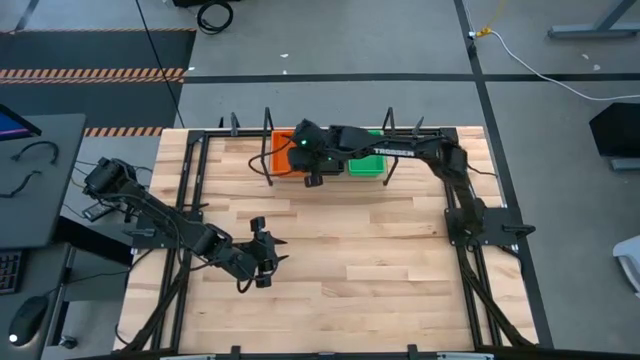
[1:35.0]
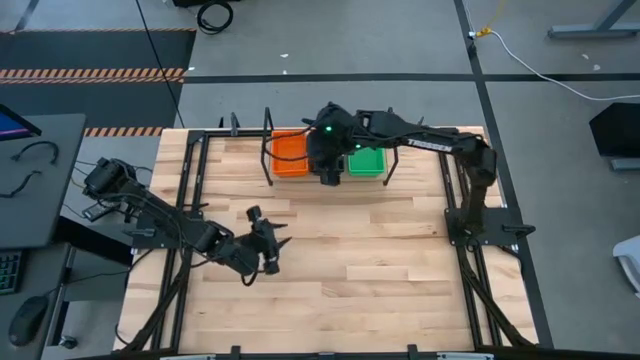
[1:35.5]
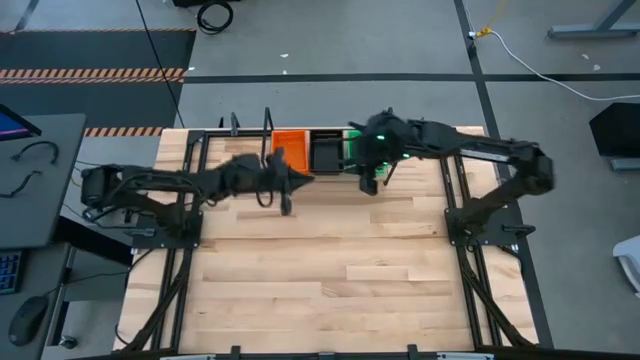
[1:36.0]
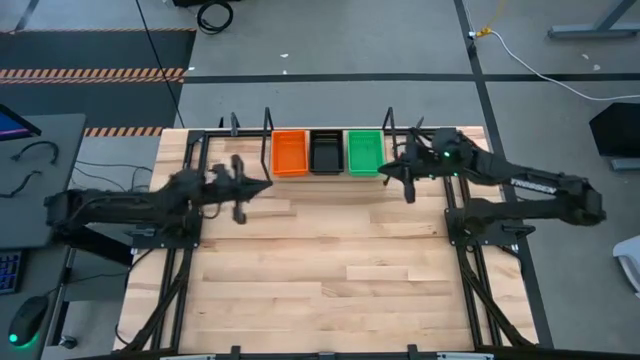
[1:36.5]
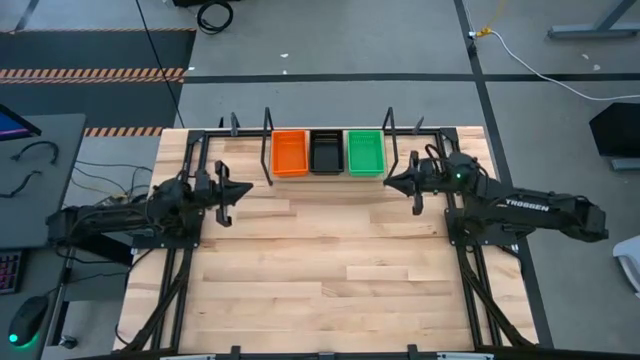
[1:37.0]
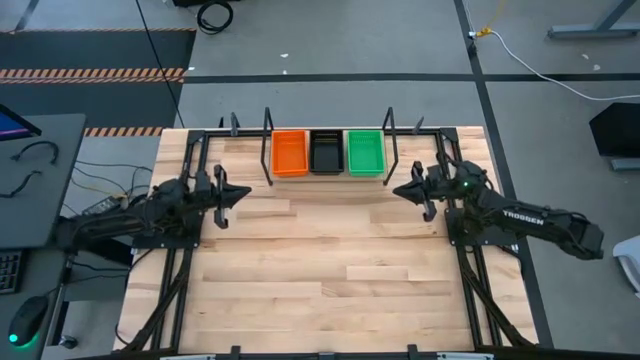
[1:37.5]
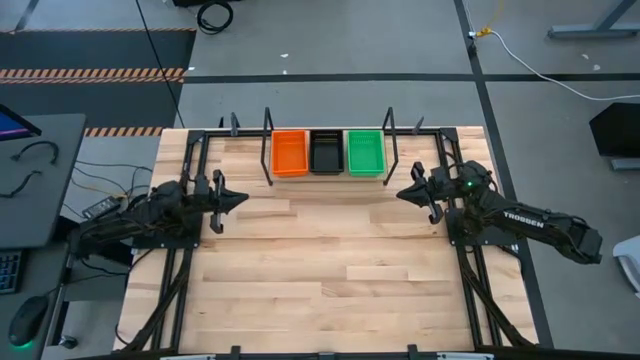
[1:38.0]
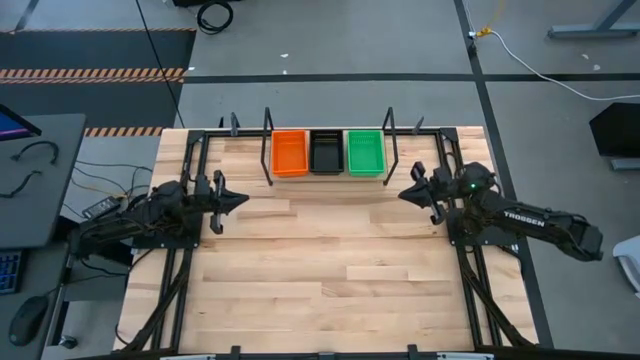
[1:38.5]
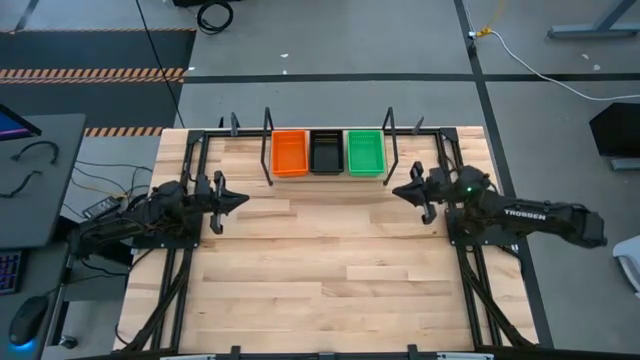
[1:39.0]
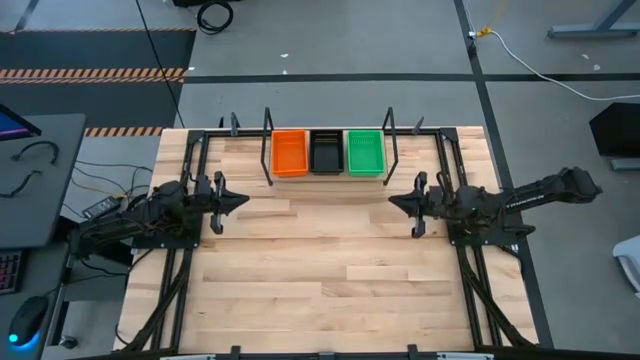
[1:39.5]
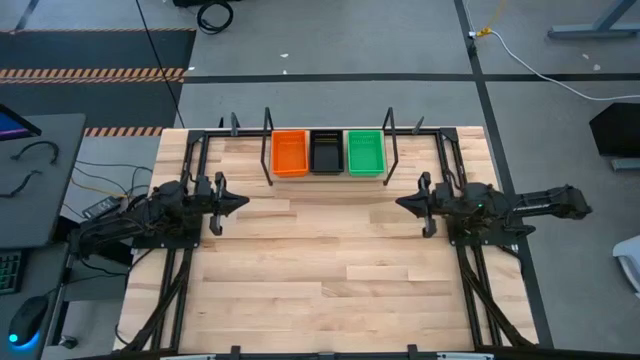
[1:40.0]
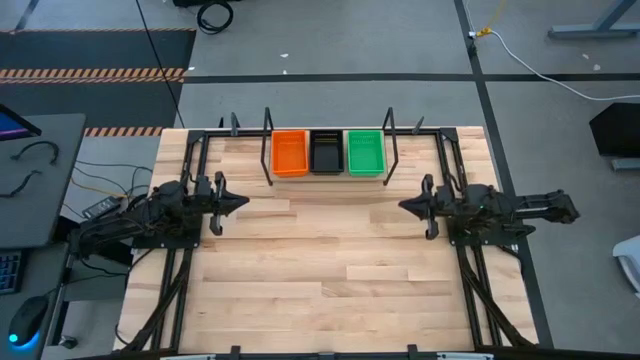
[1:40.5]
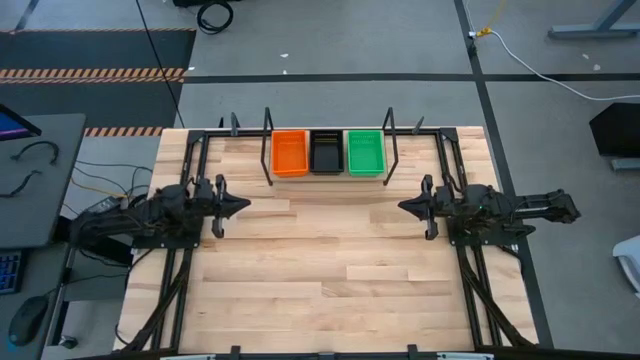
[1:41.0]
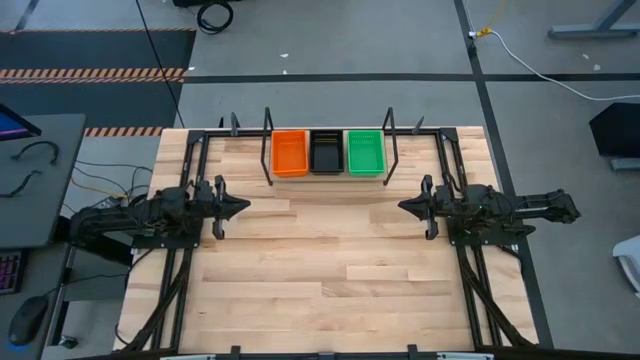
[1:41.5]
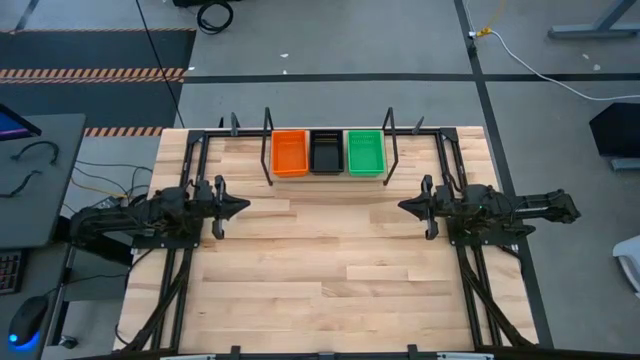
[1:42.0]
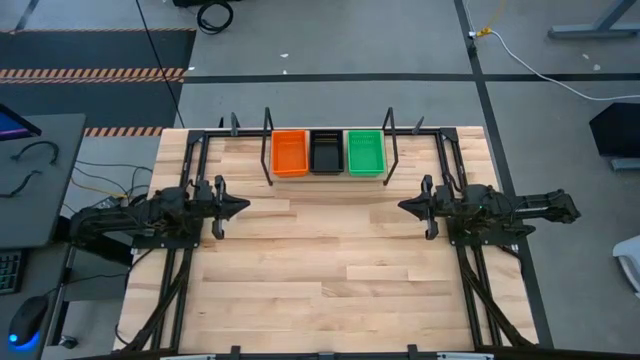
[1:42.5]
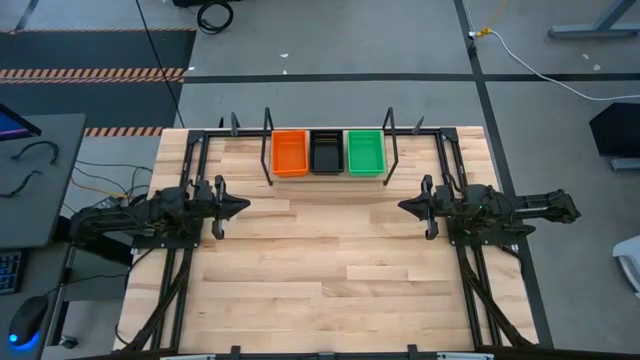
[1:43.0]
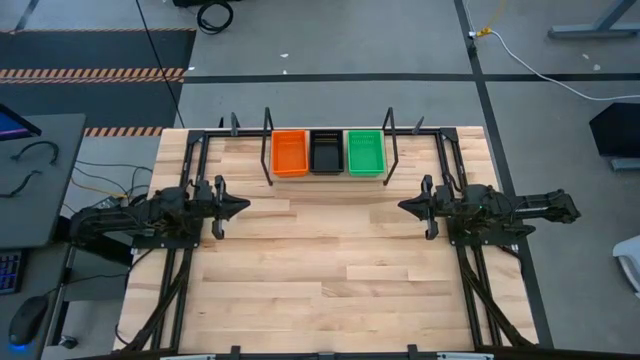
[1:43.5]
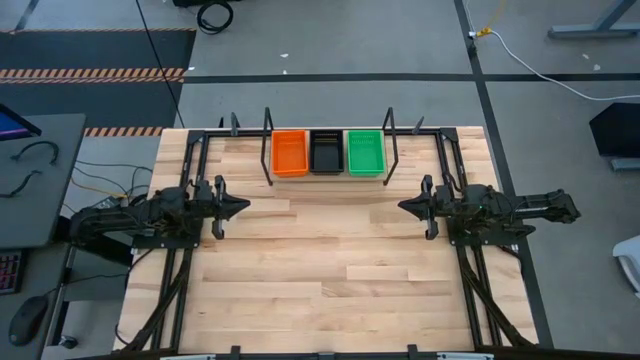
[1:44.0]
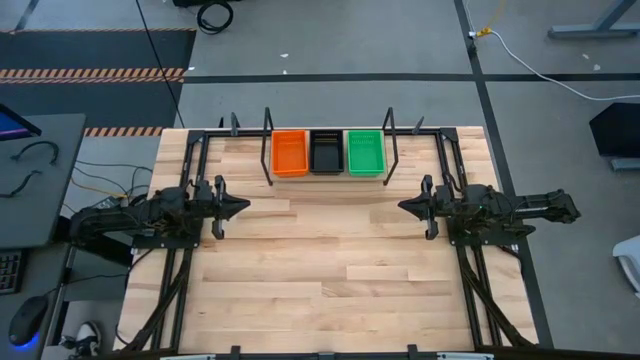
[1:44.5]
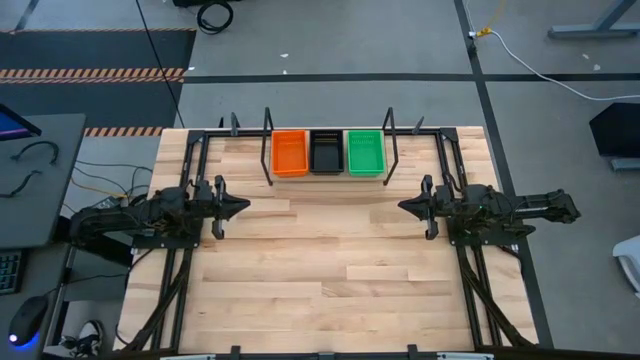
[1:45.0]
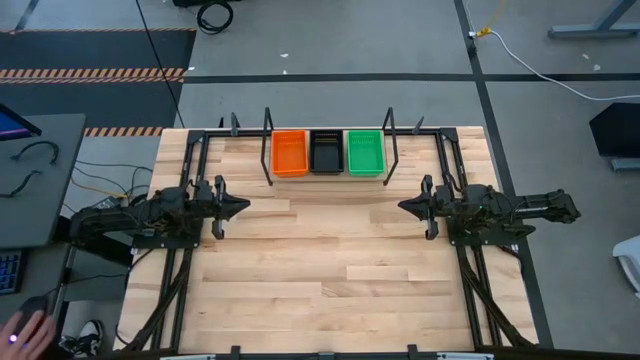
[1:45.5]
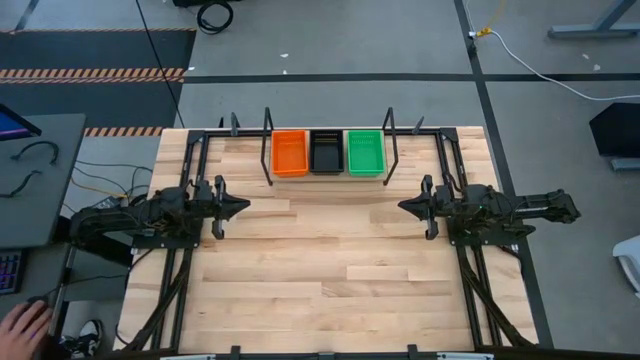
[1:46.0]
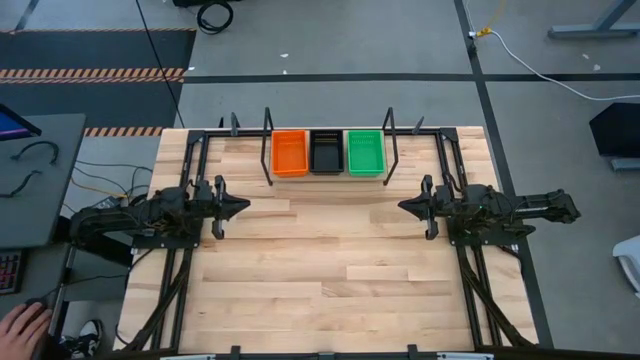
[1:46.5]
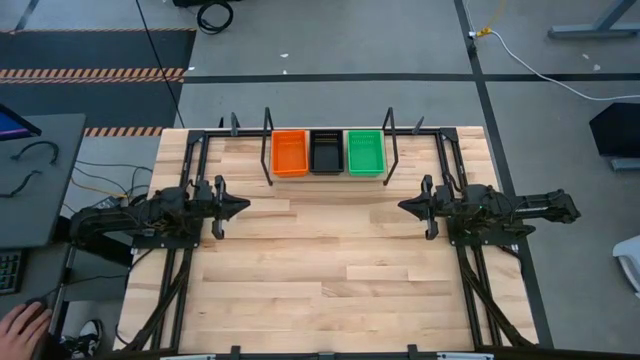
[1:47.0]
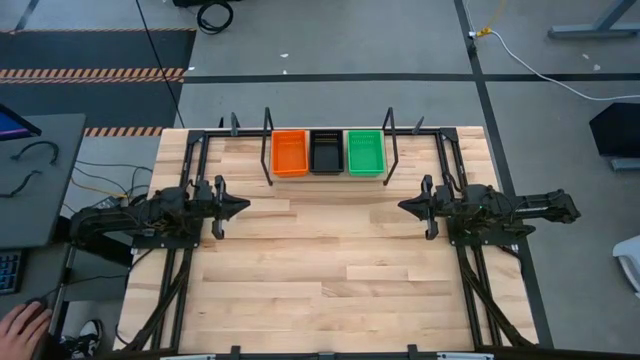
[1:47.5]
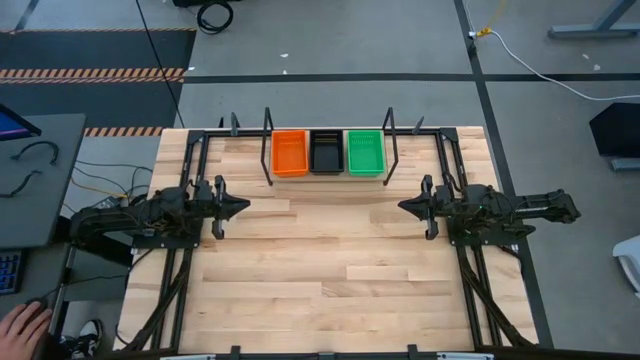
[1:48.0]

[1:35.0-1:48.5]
Task: Stack baskets on shelf by color
Return to Home Position

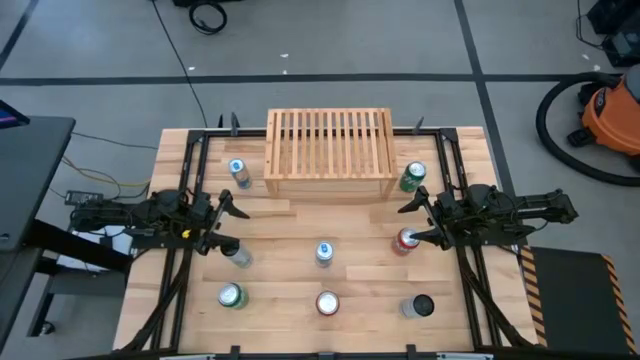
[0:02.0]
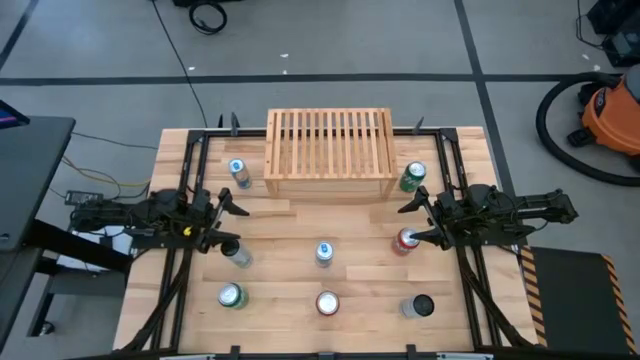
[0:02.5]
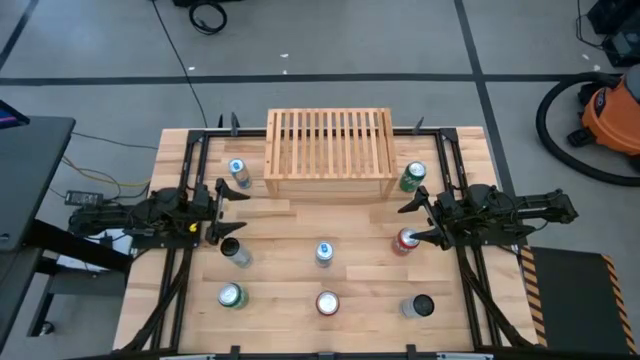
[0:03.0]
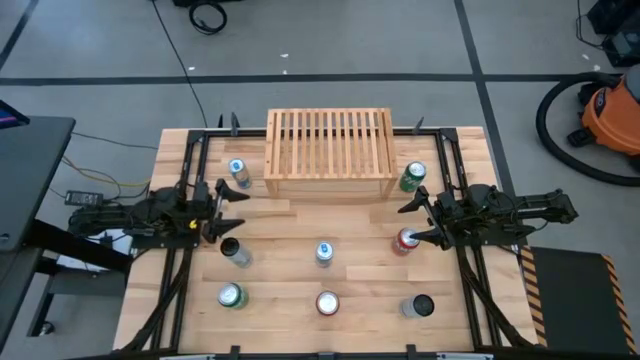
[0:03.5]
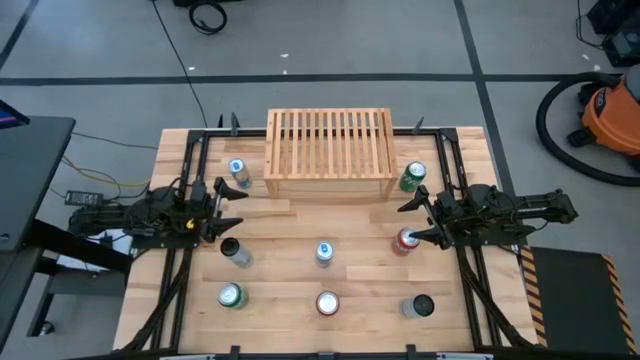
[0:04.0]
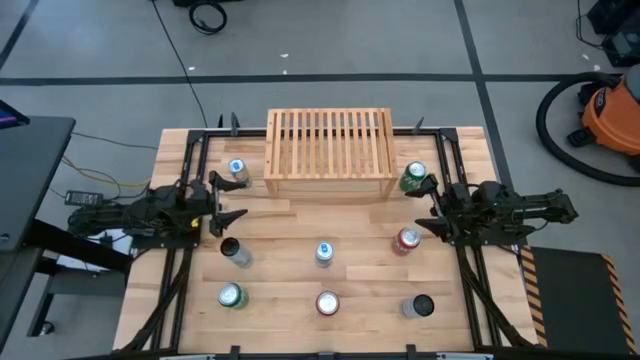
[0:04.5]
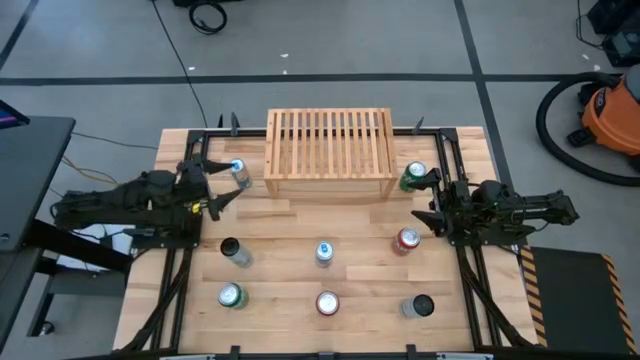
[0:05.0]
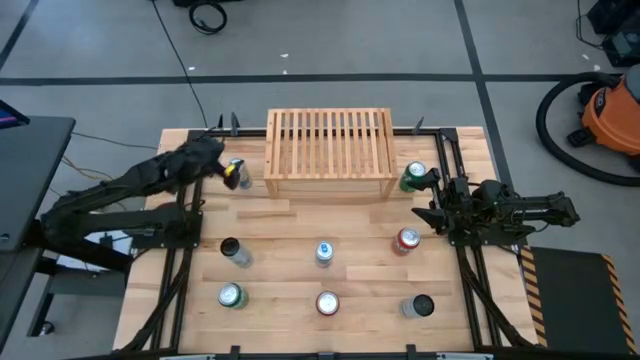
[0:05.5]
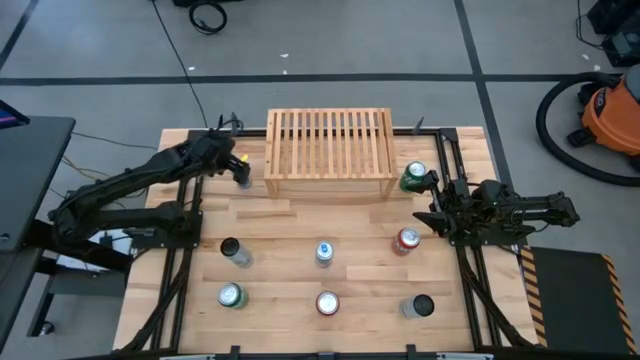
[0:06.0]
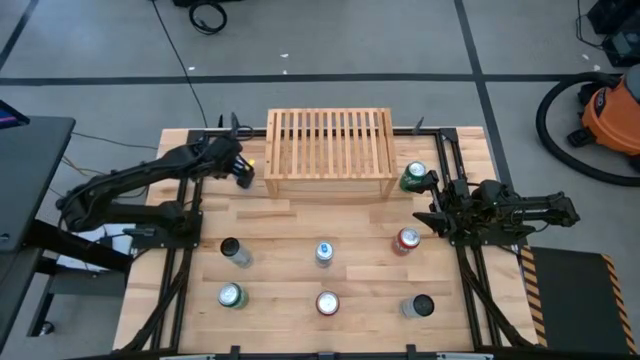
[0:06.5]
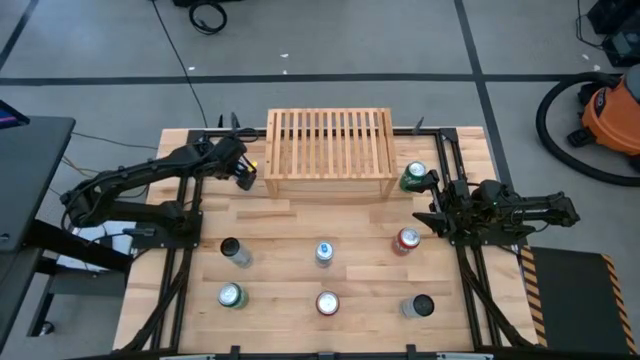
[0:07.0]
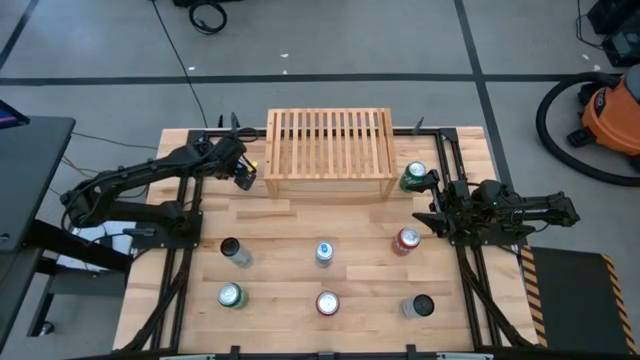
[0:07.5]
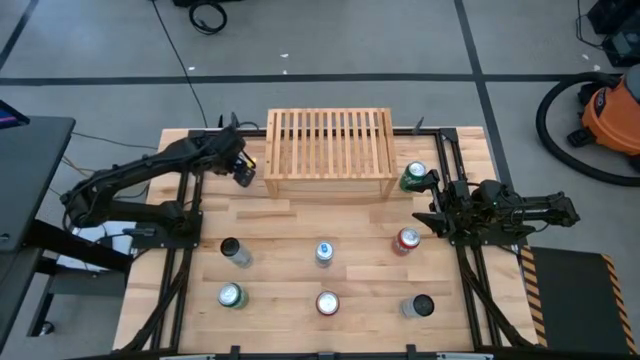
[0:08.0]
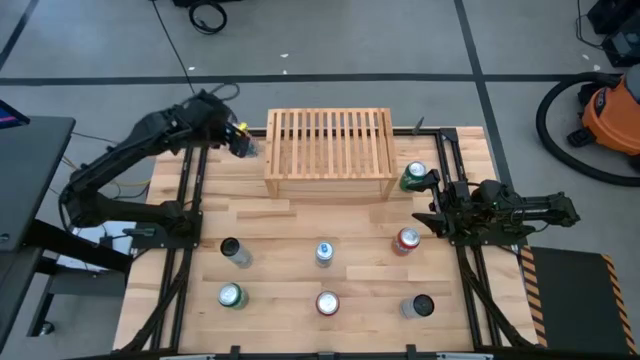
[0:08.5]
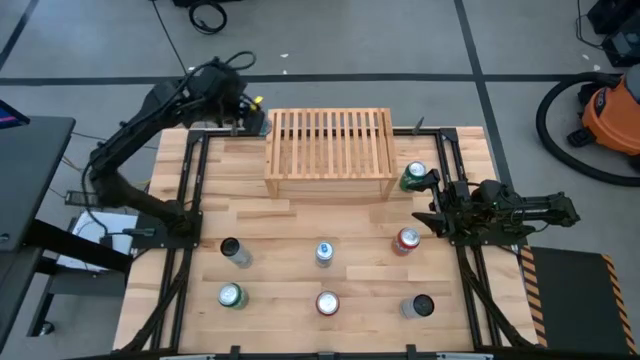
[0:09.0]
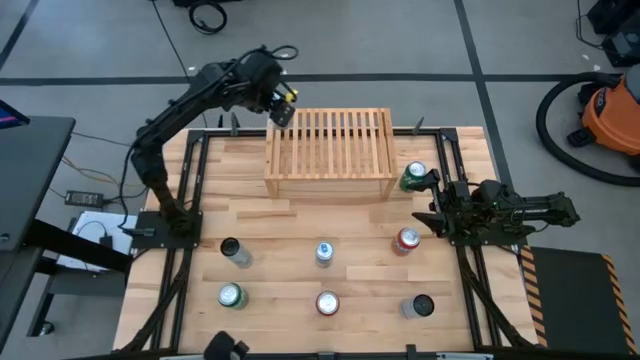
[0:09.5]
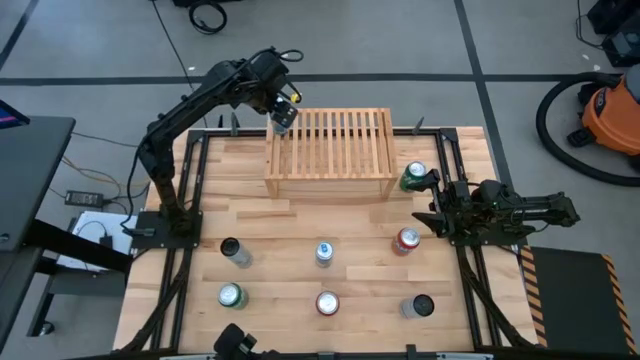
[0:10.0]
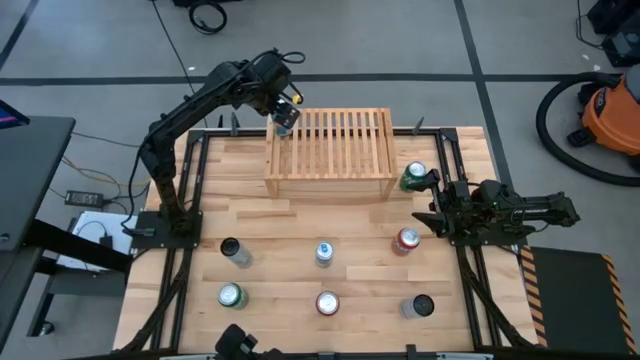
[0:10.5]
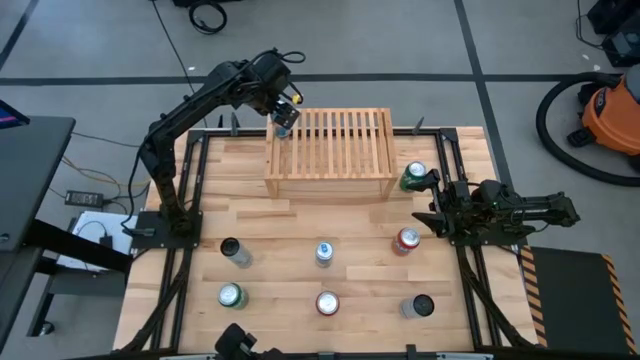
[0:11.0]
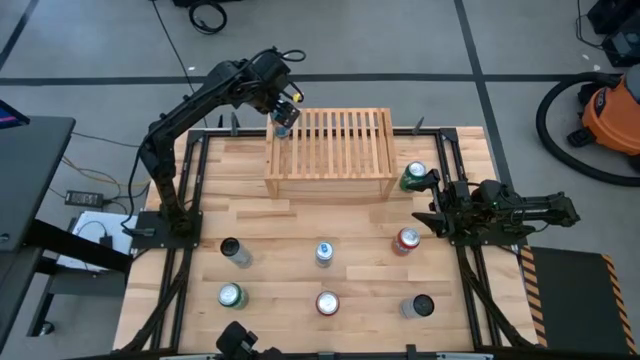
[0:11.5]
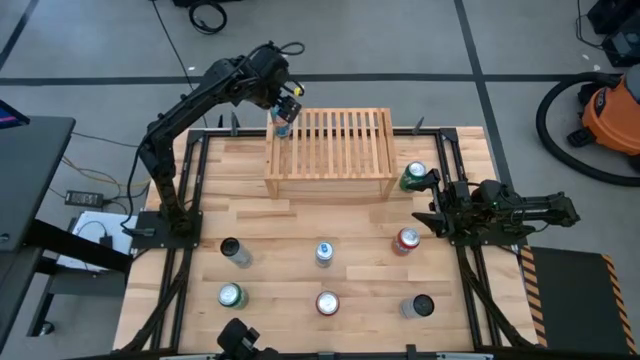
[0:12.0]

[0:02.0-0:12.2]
Task: Place canned beverage on shelf
Put the top blue soda can on the shelf
